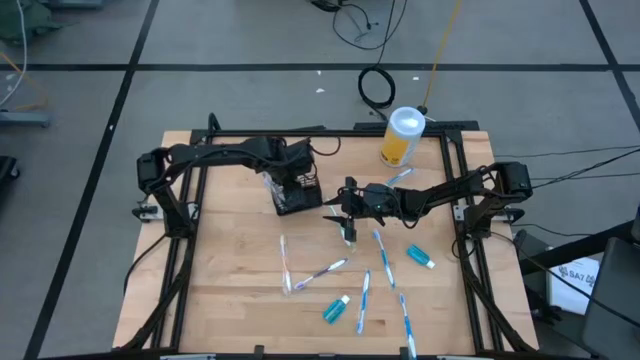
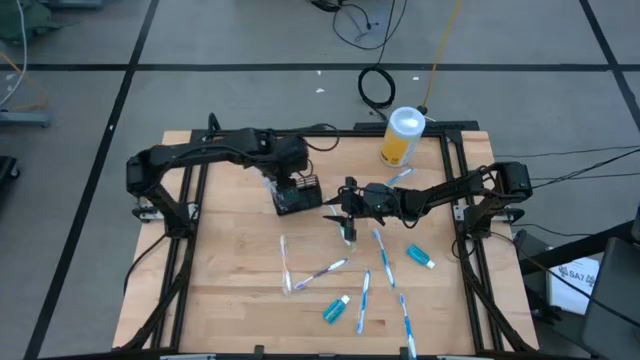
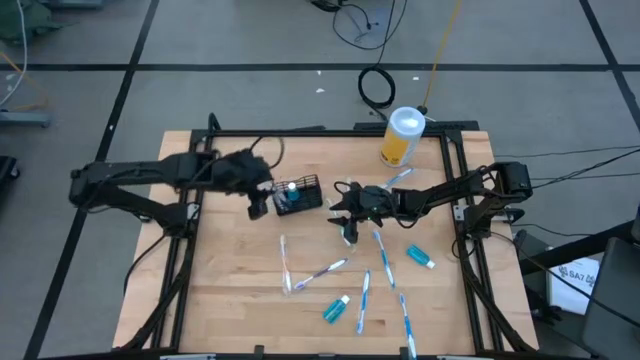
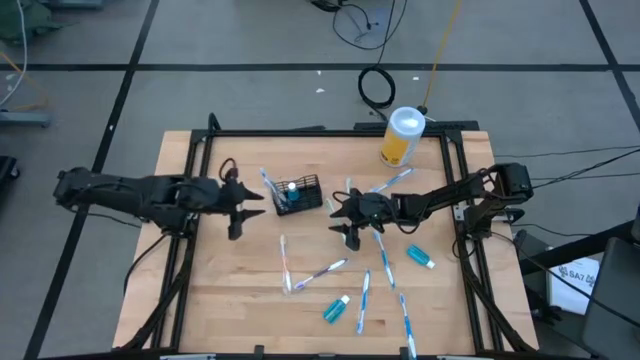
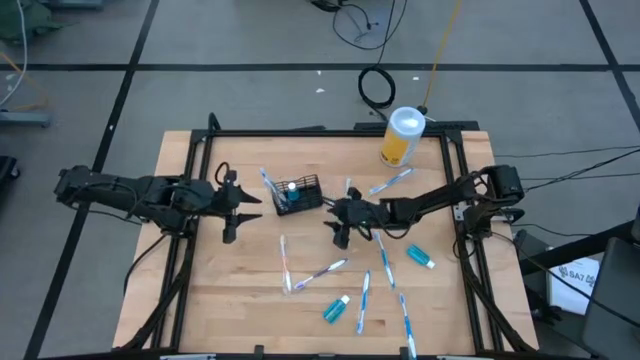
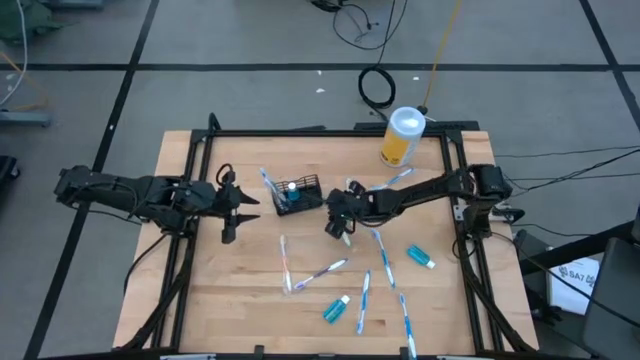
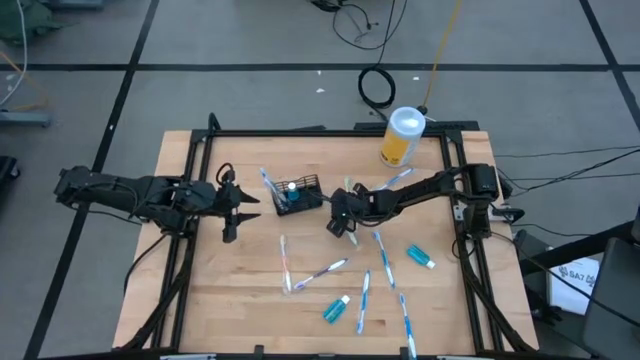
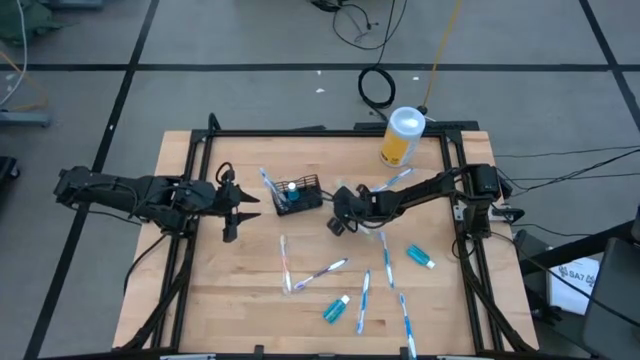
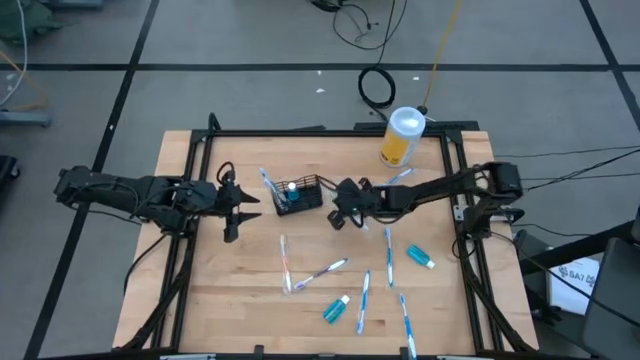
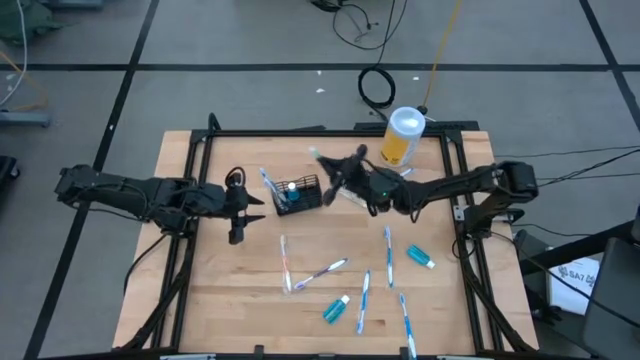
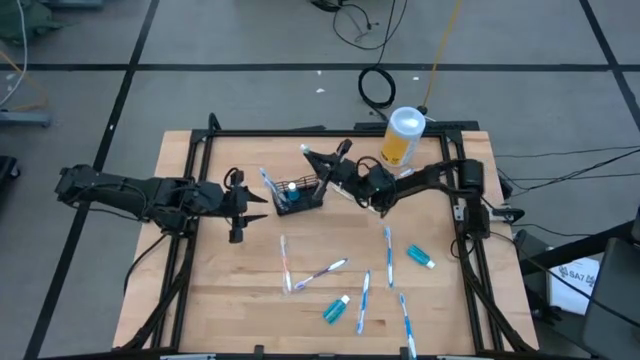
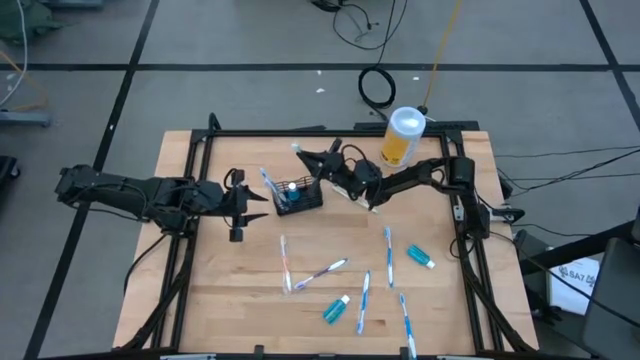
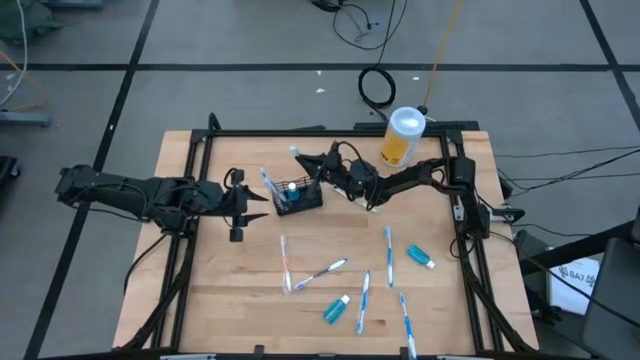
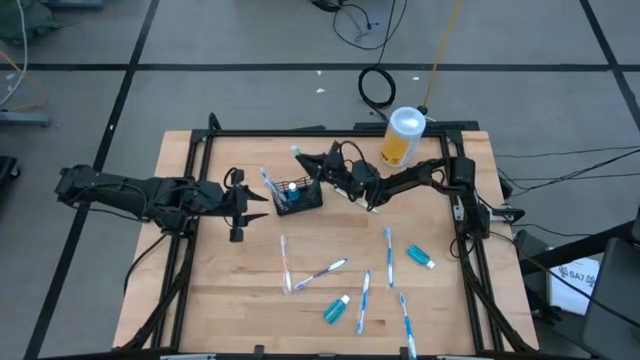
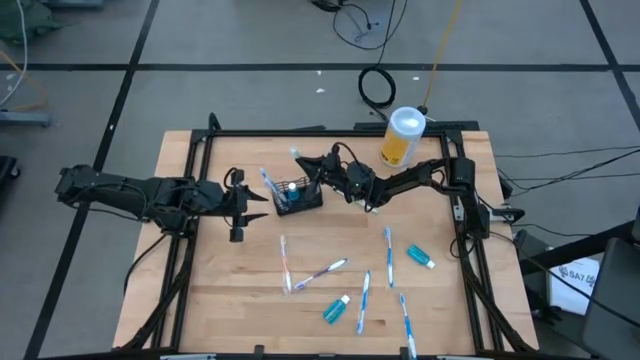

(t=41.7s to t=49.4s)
Task: Pick & Place toothbrushing station
Put the green toothbrush into the black mesh organizer

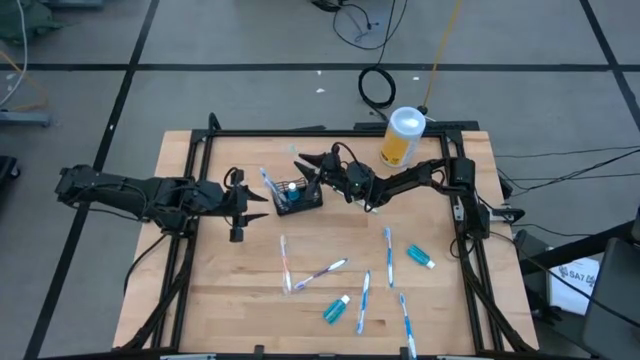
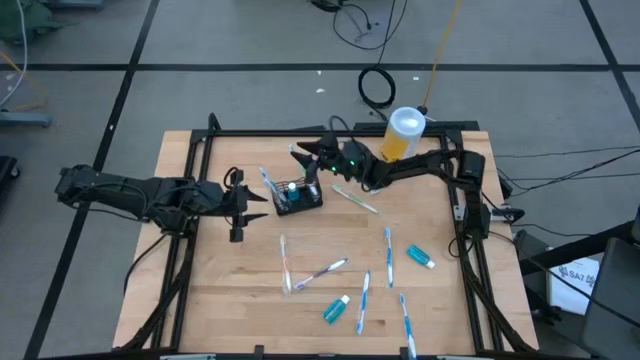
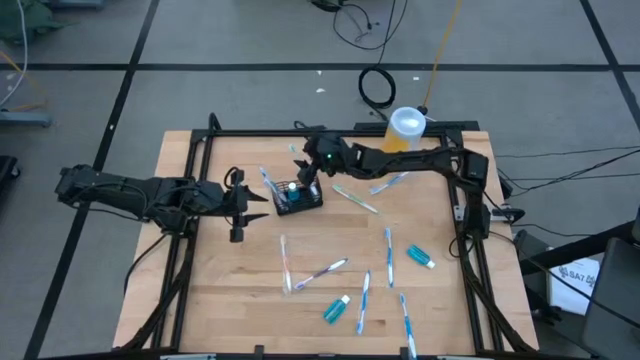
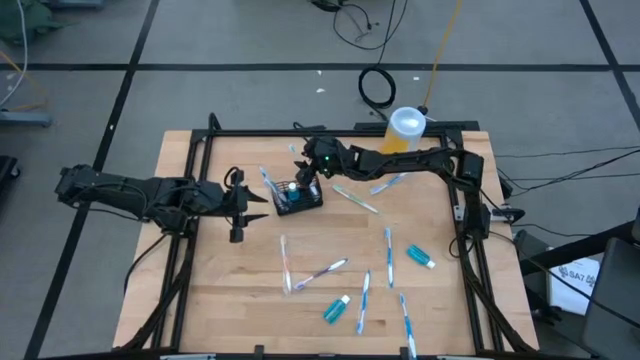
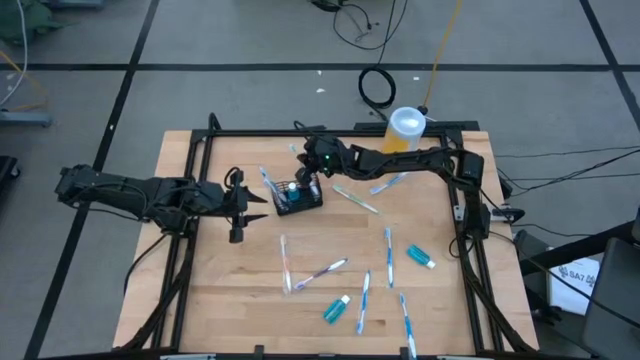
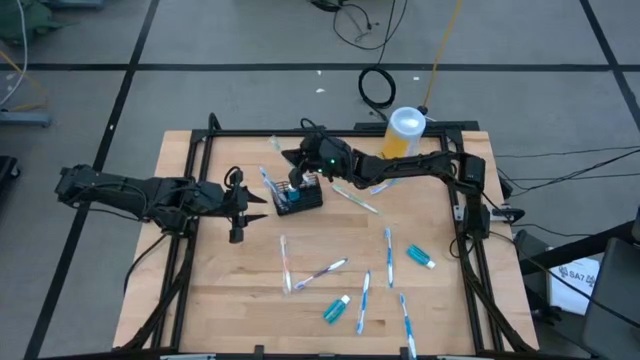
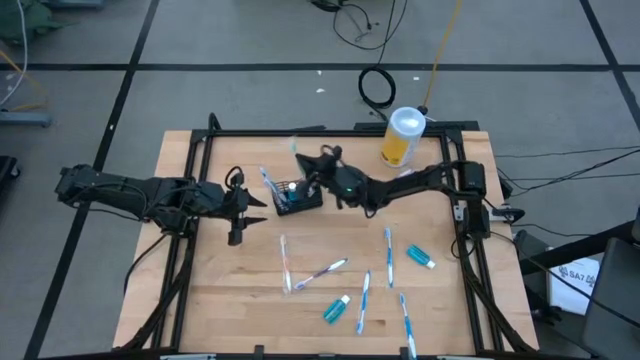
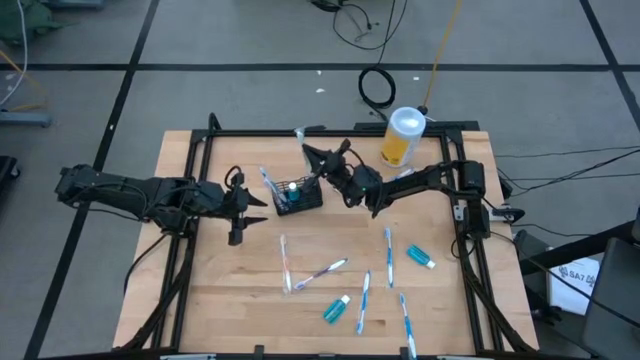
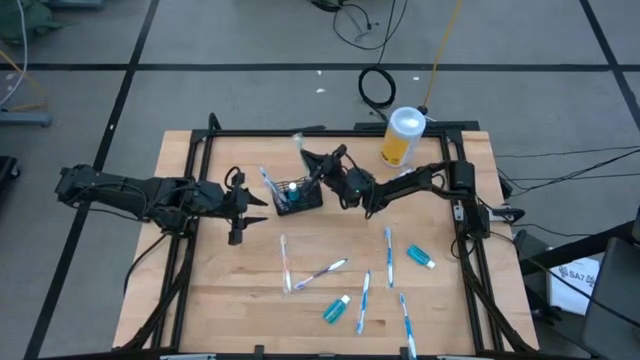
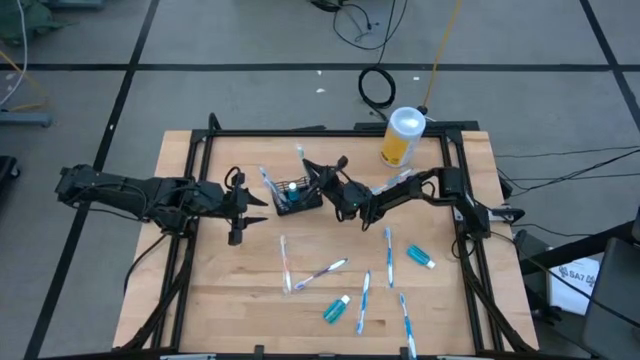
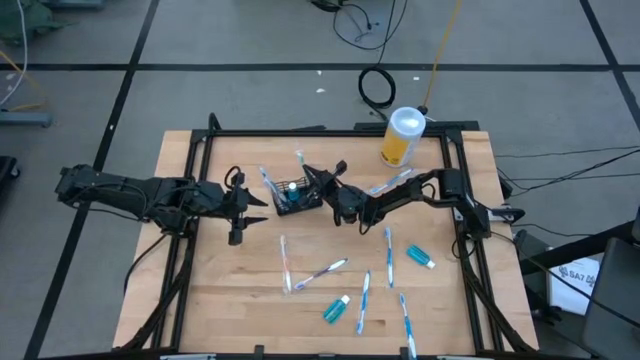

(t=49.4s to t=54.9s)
Put the green toothbrush into the black mesh organizer

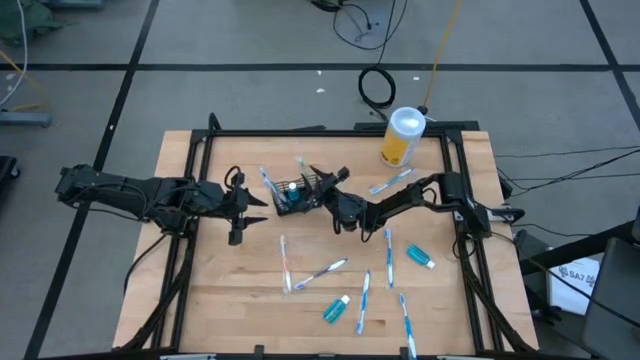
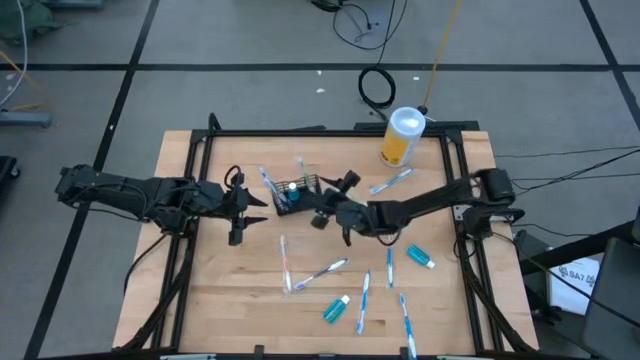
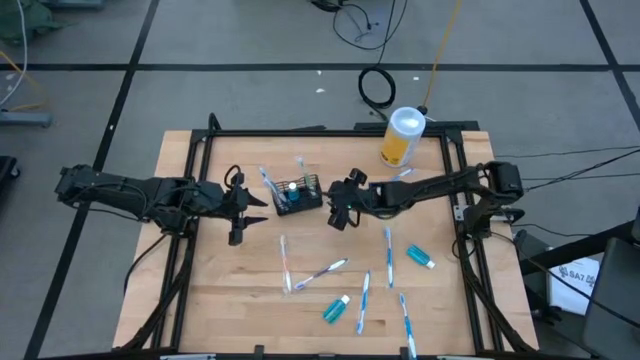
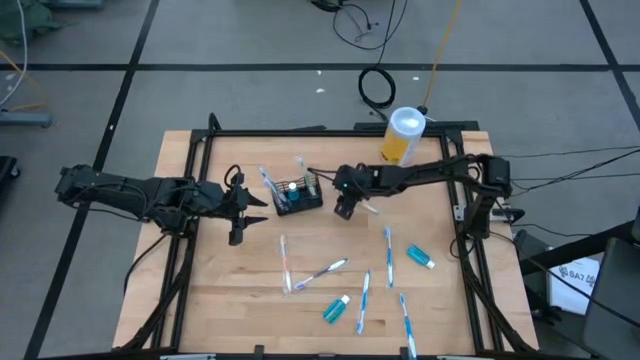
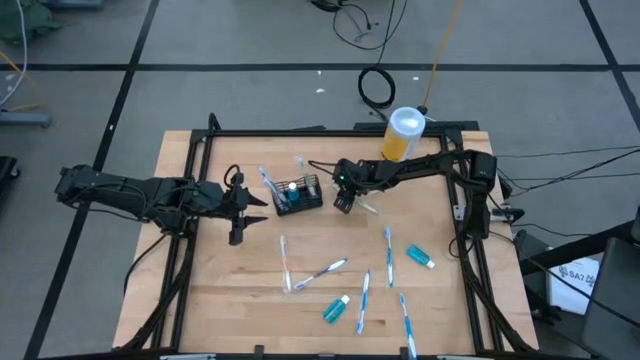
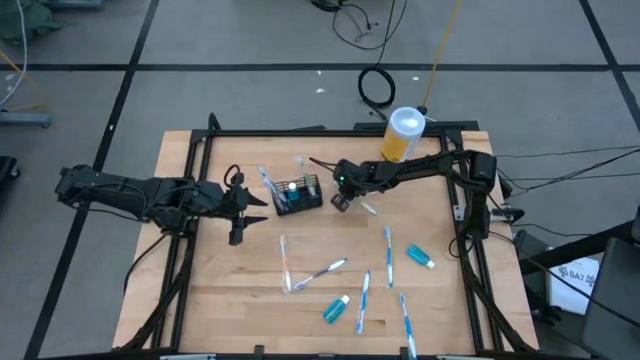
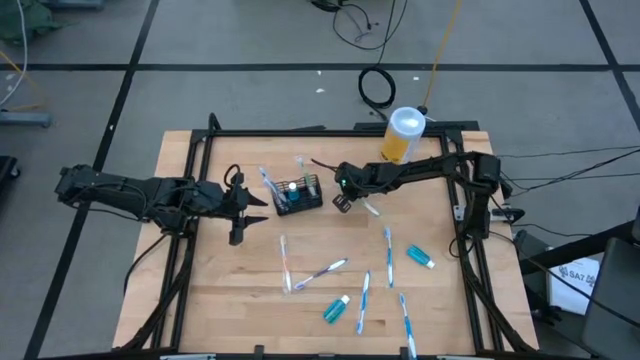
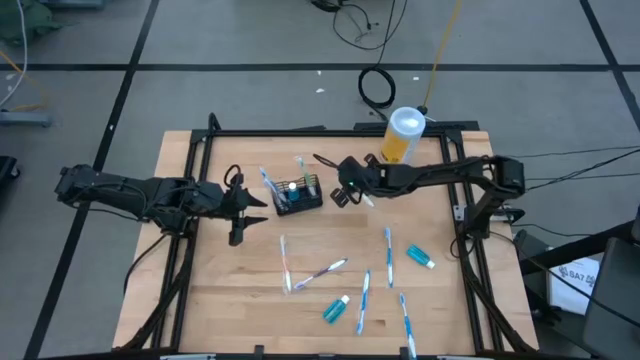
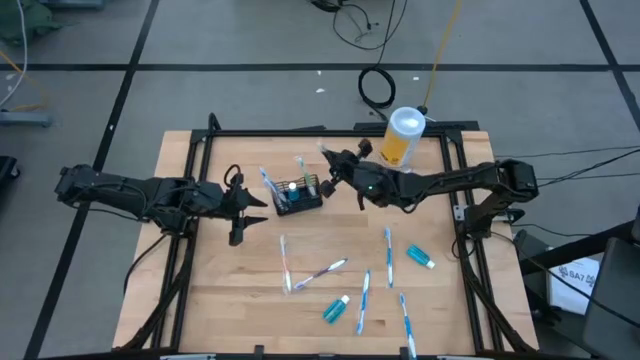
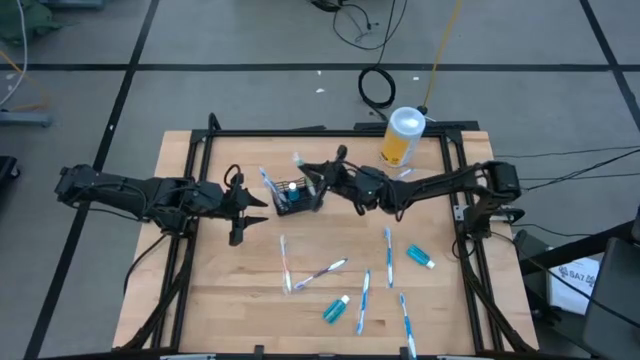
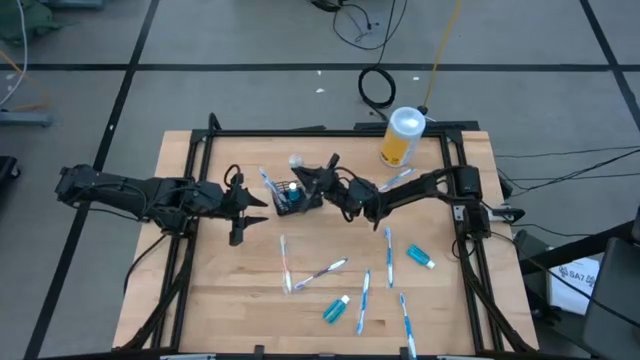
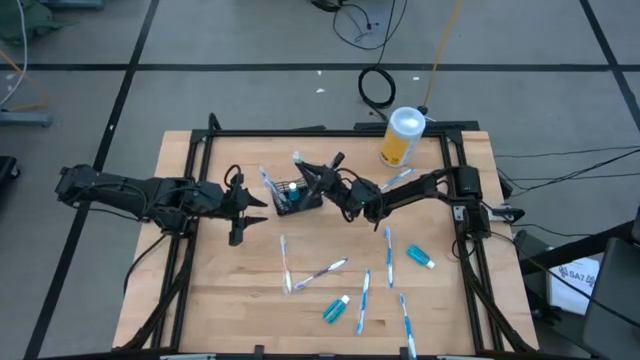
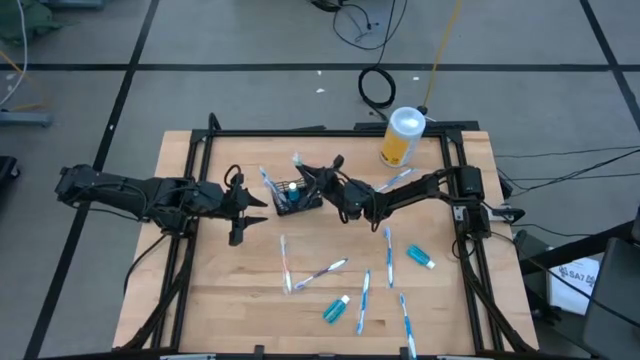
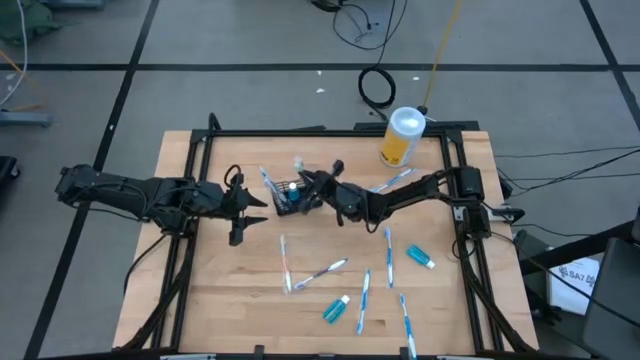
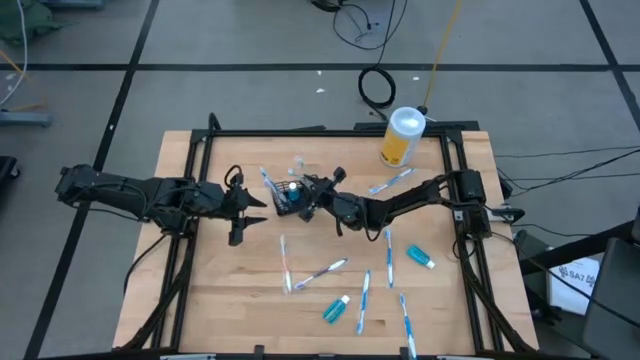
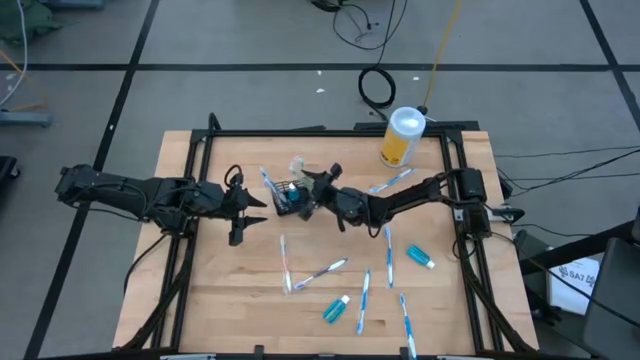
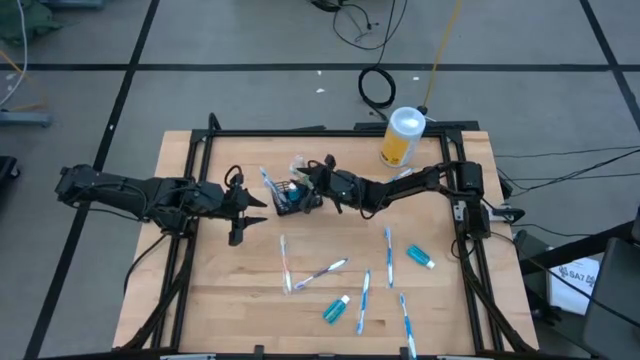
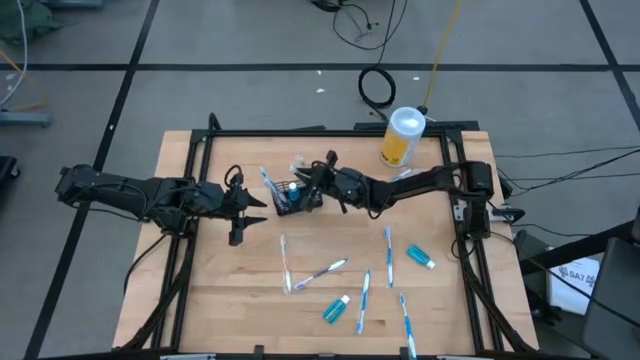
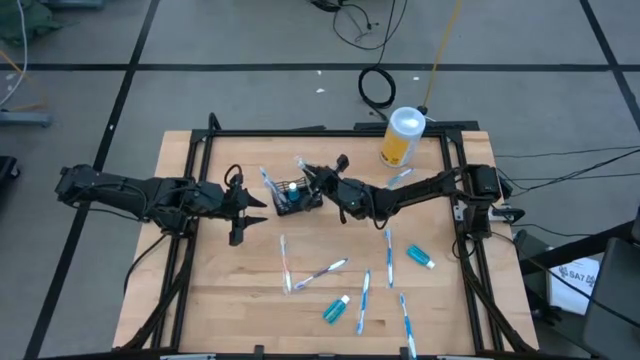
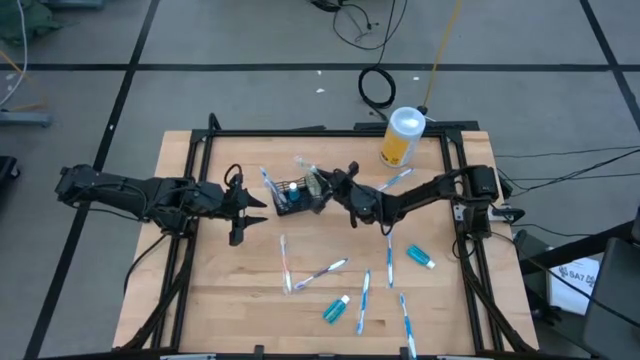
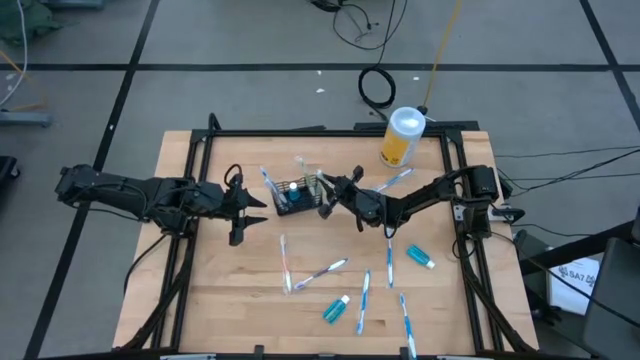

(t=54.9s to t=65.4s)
Put the green toothbrush into the black mesh organizer
